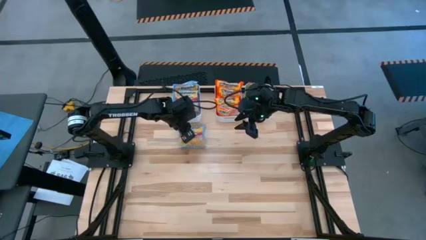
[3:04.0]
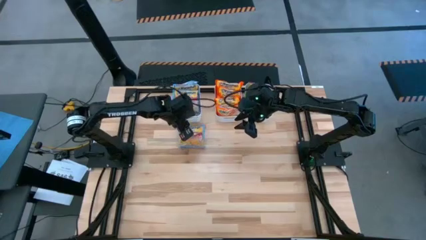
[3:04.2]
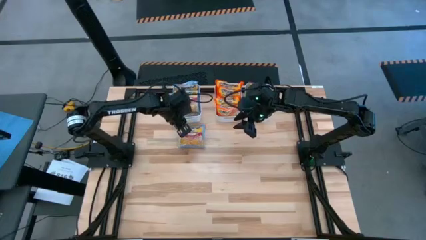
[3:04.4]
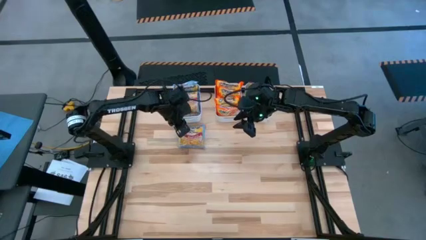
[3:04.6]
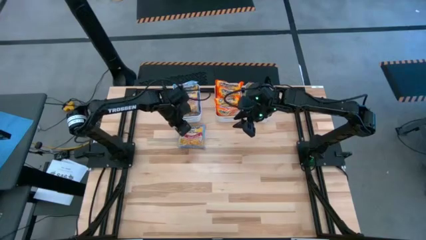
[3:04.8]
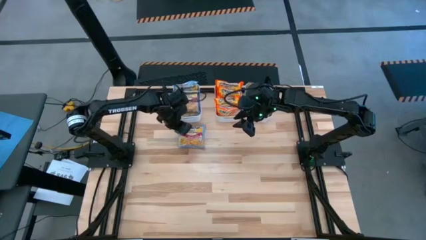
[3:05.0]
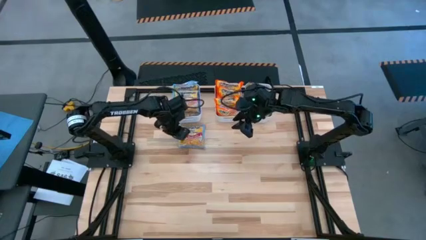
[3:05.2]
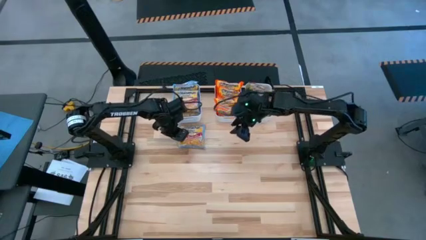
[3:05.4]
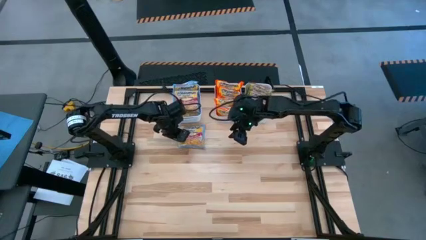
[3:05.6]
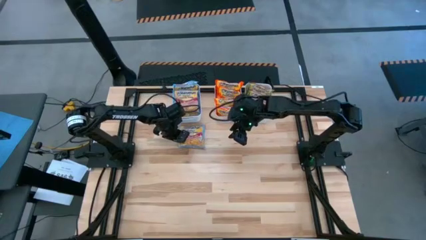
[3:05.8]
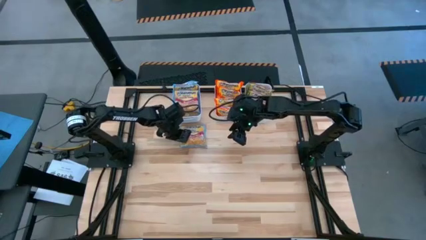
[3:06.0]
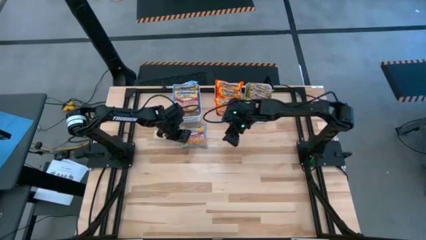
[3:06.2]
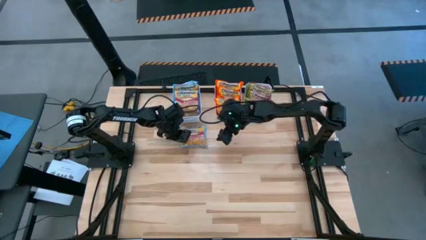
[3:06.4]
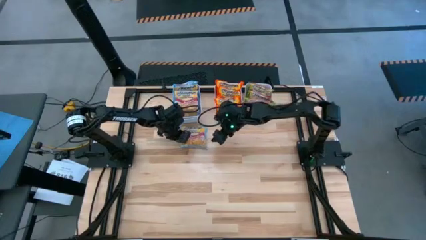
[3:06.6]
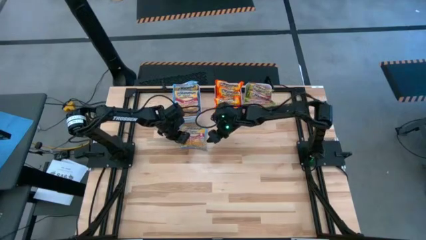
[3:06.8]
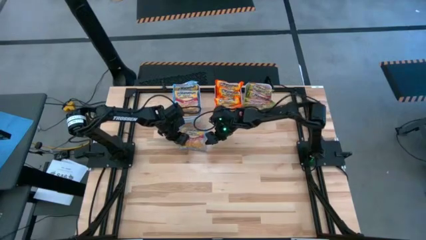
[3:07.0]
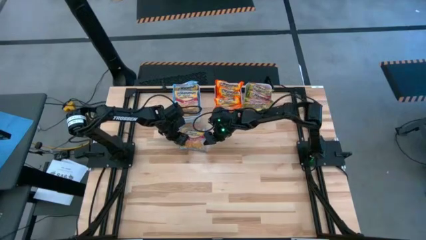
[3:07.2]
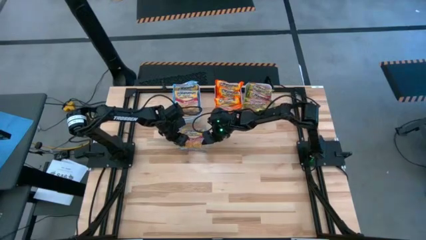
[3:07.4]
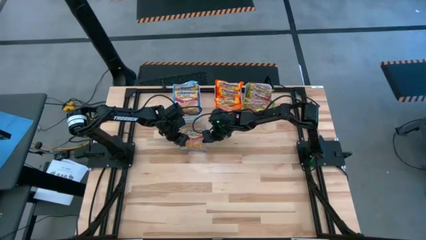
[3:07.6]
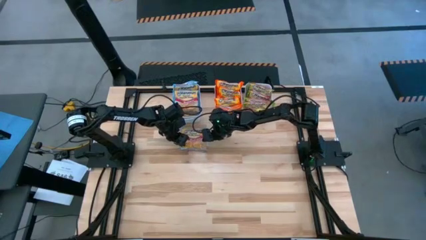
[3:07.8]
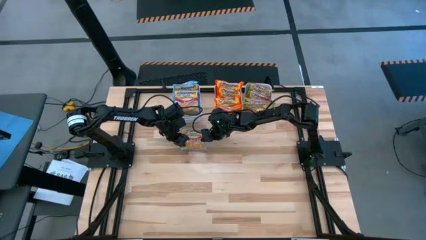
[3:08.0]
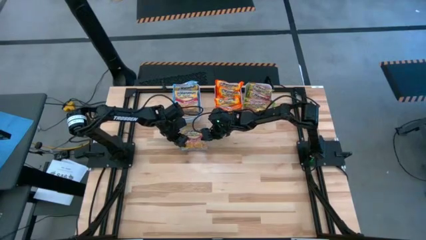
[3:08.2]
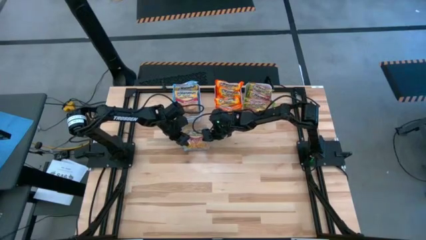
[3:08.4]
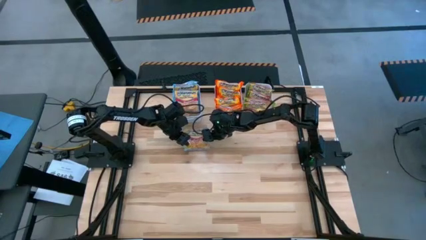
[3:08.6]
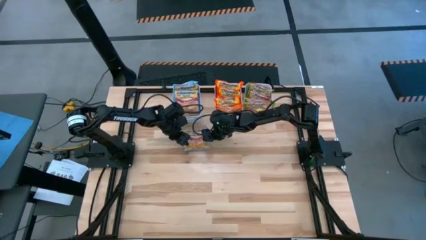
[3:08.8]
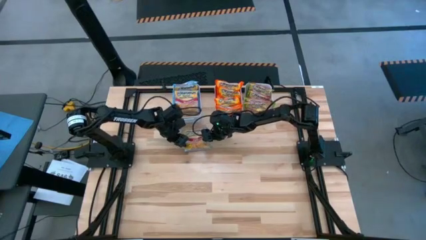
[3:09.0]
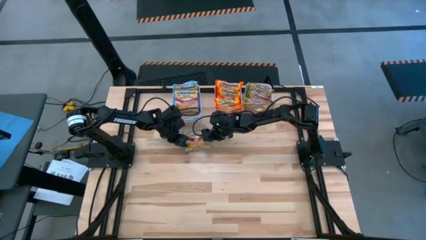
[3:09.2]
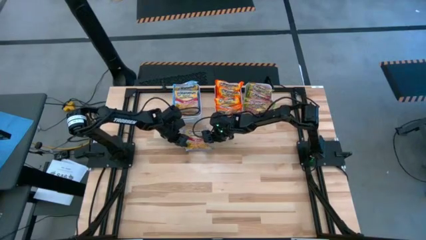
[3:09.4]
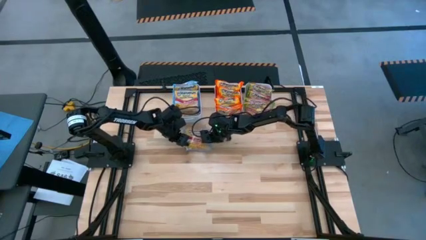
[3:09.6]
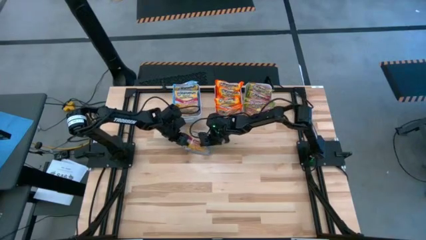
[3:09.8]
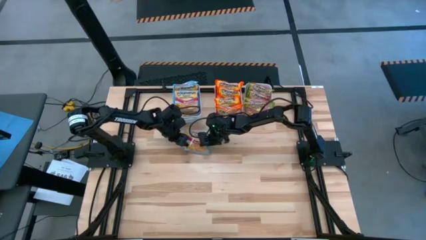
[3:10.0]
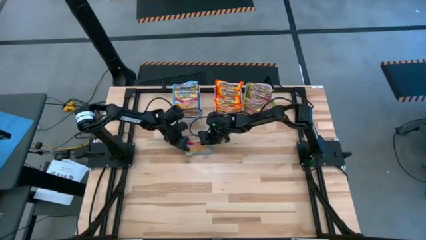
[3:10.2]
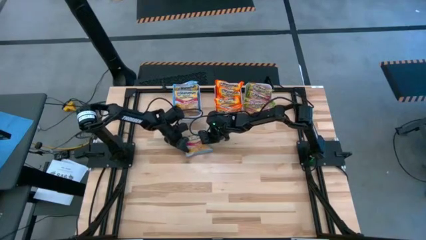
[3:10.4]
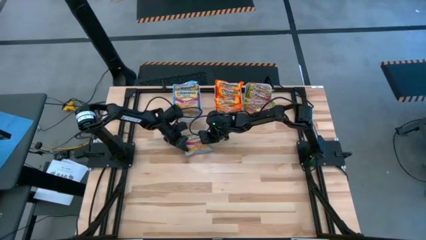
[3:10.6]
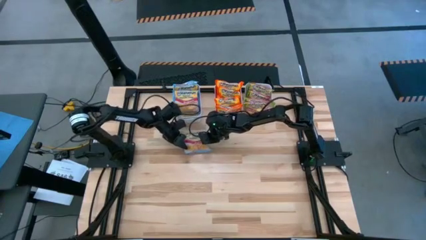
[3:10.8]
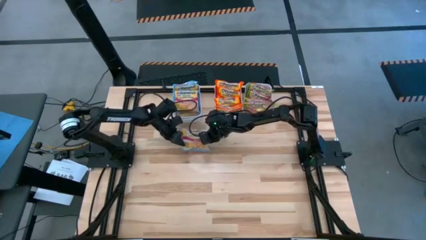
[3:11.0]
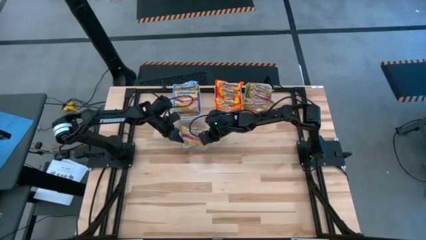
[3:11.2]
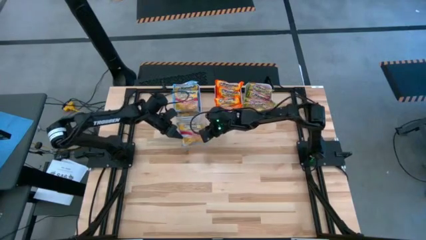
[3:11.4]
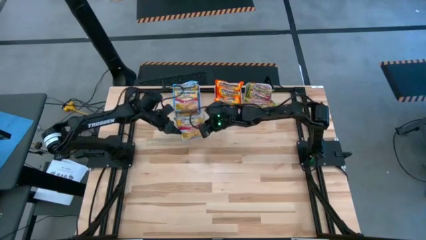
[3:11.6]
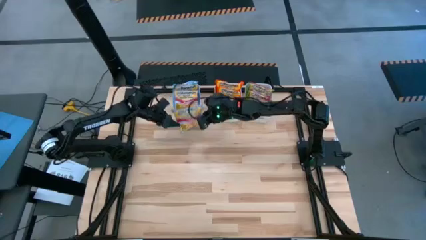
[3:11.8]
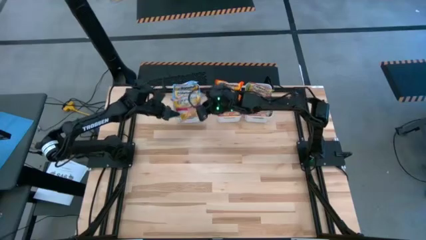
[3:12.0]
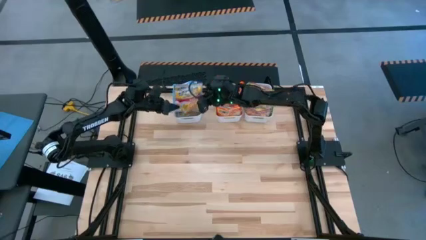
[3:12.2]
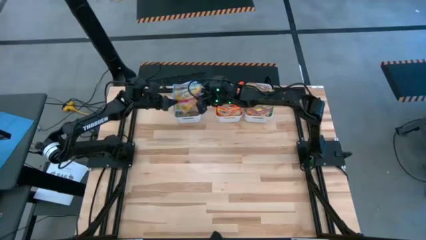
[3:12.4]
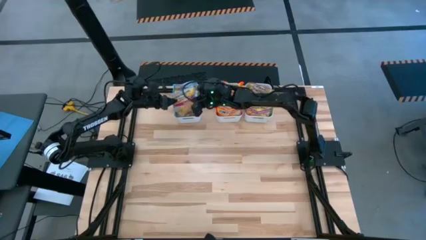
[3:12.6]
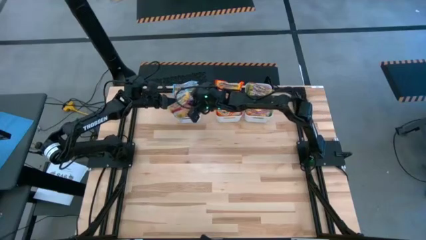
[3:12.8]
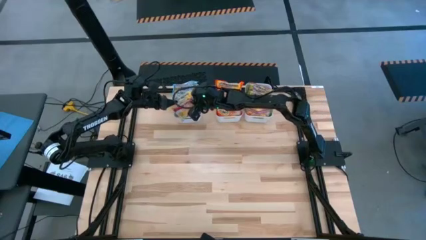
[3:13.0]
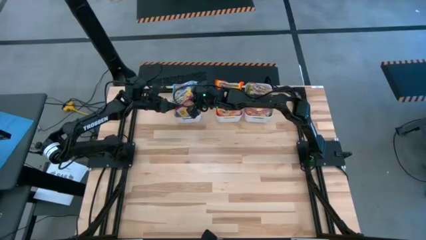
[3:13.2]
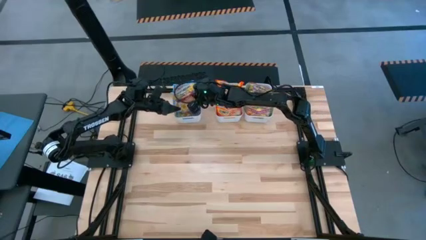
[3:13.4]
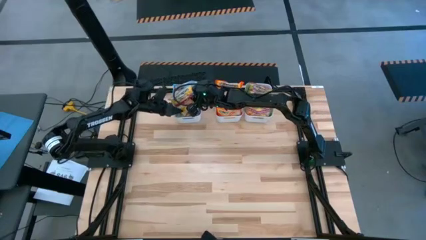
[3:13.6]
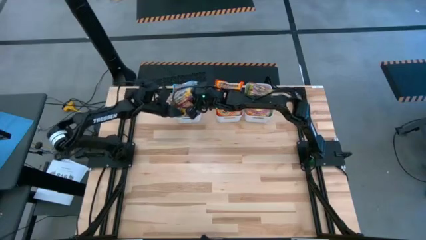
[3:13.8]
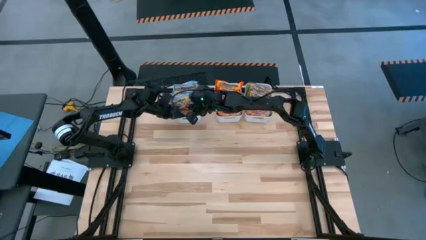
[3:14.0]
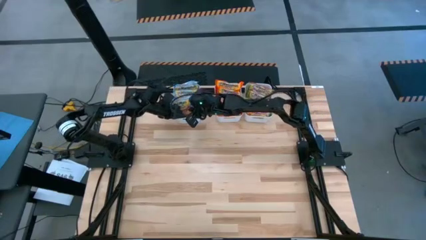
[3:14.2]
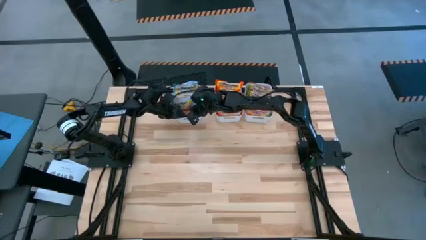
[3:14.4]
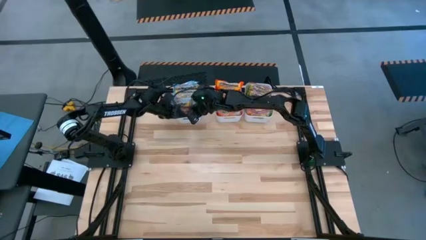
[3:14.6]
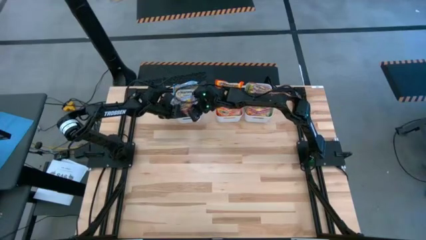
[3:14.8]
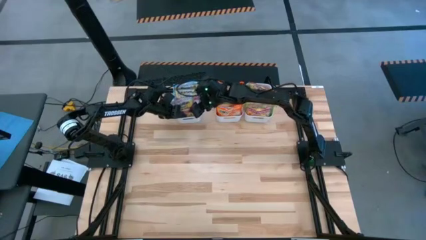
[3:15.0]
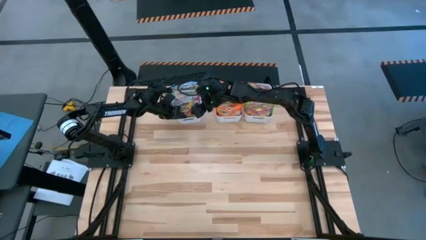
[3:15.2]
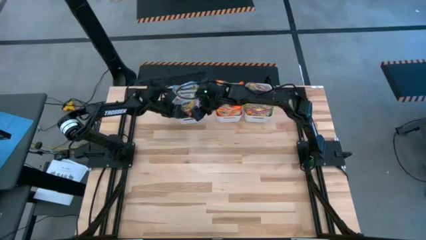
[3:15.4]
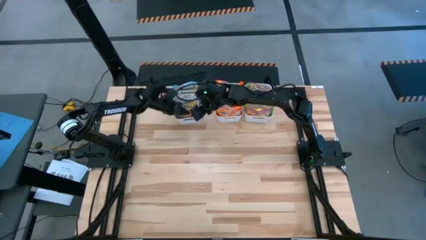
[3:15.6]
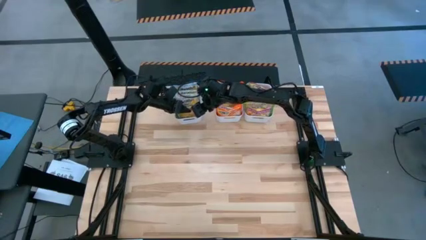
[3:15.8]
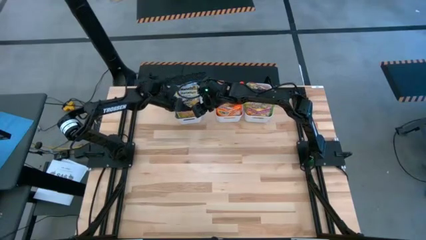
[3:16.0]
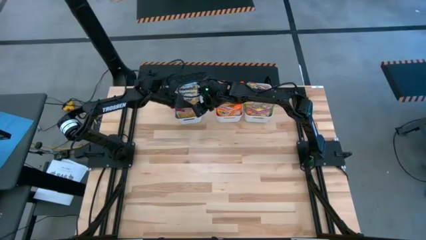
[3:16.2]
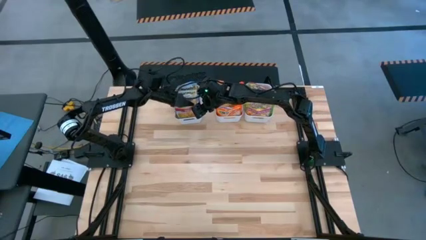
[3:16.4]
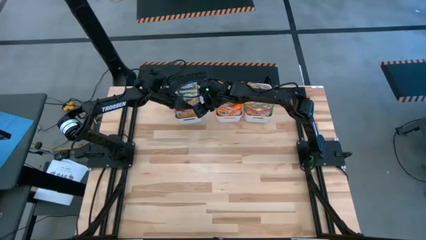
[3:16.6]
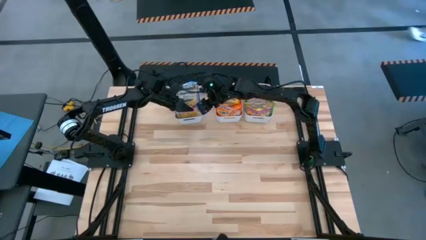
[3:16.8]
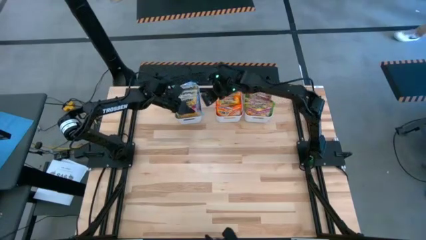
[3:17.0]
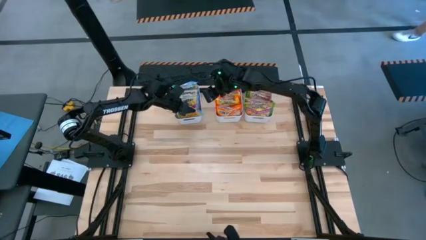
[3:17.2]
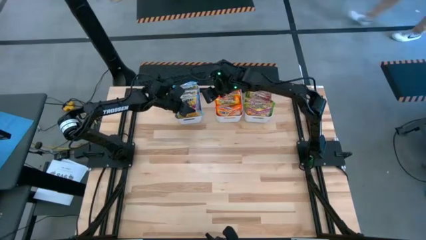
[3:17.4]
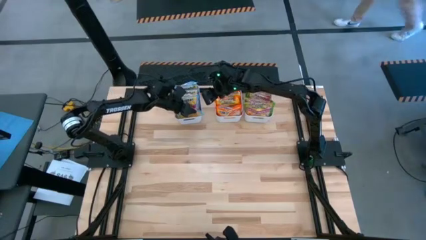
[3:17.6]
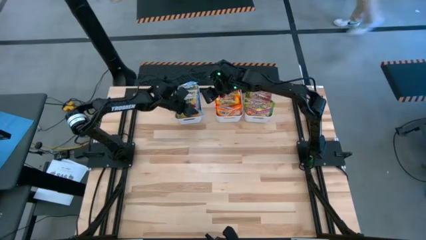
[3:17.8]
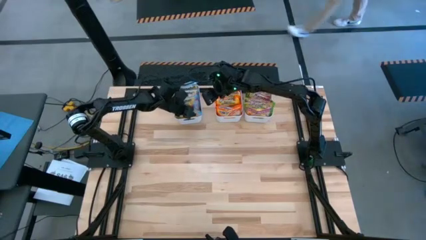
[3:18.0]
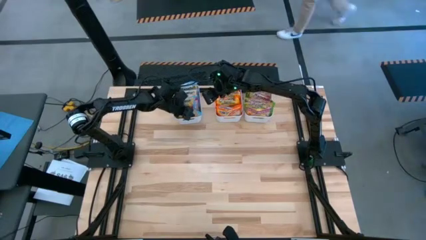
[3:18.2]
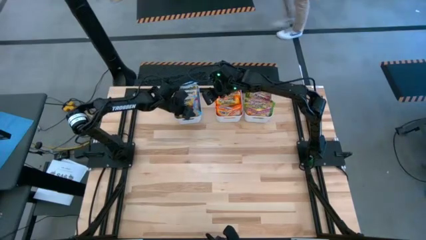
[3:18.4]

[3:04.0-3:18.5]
Task: Sort Maruchan noodles
Put the blue noodle pack into the left white bin
